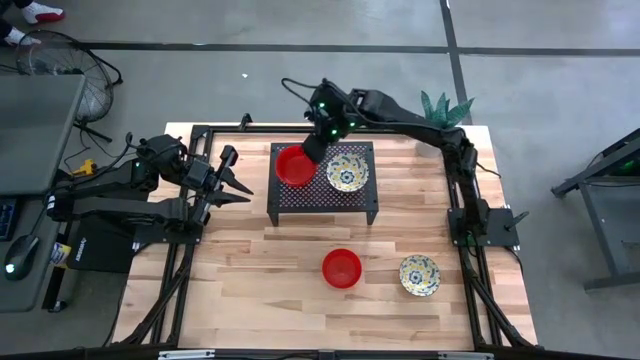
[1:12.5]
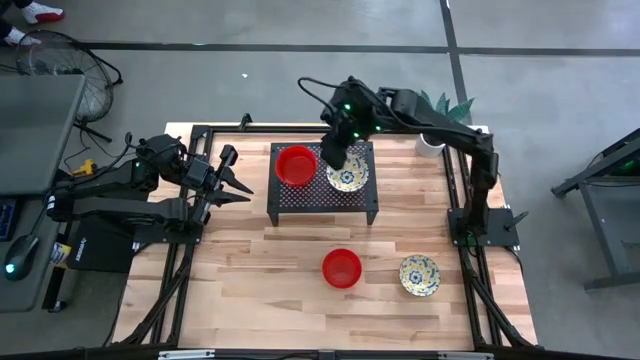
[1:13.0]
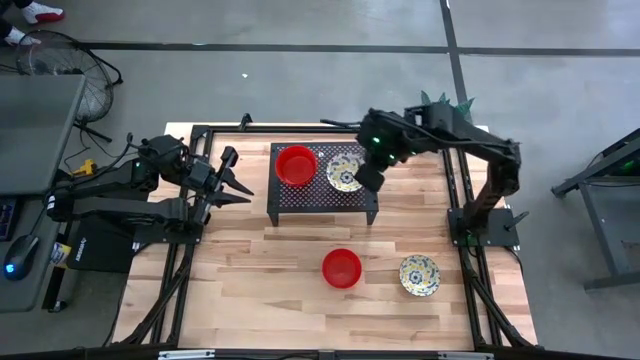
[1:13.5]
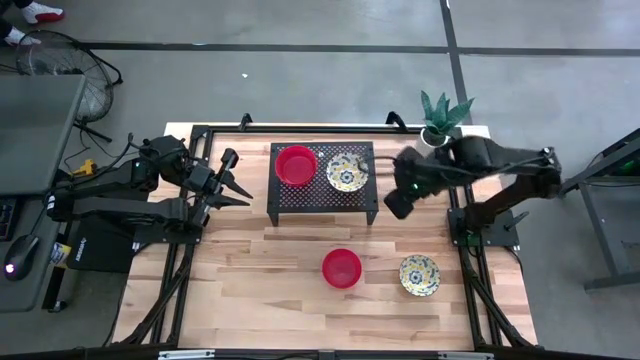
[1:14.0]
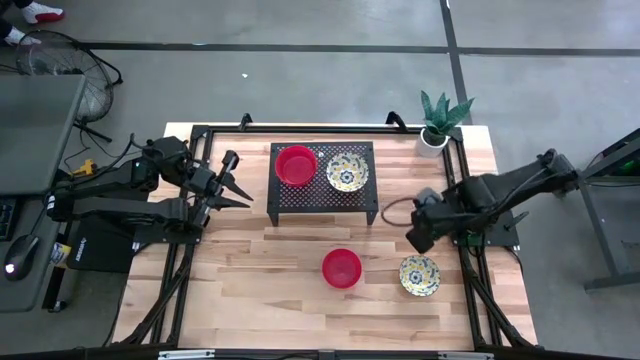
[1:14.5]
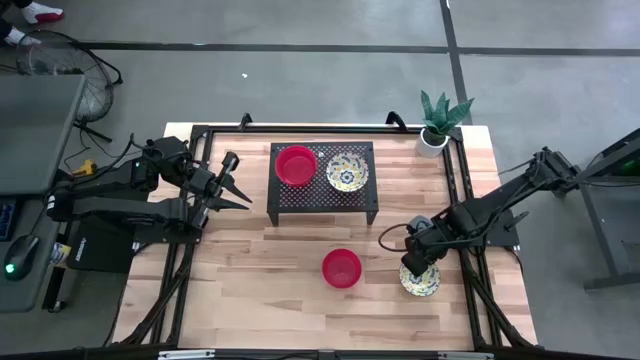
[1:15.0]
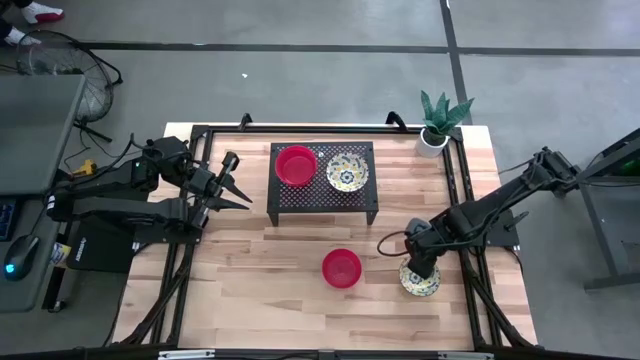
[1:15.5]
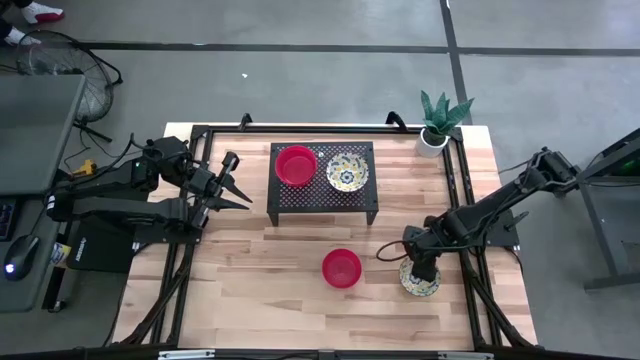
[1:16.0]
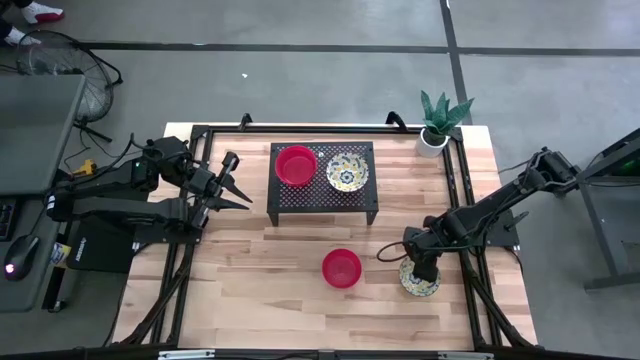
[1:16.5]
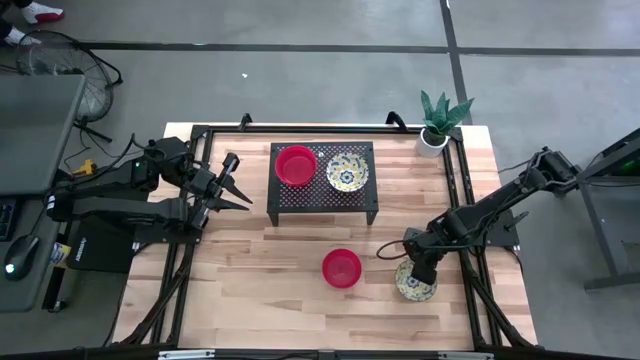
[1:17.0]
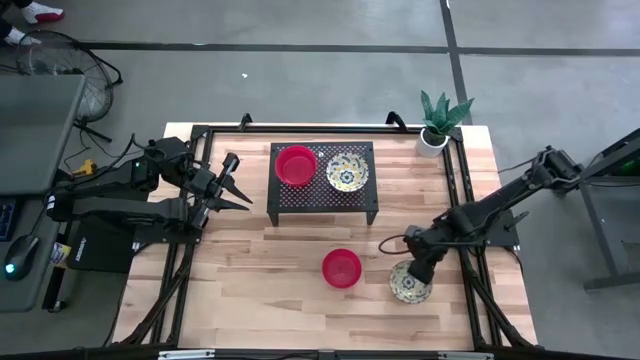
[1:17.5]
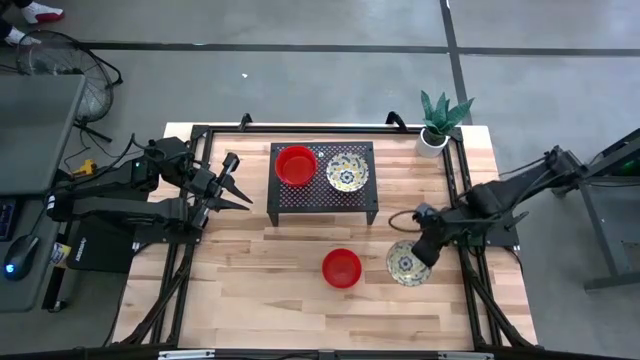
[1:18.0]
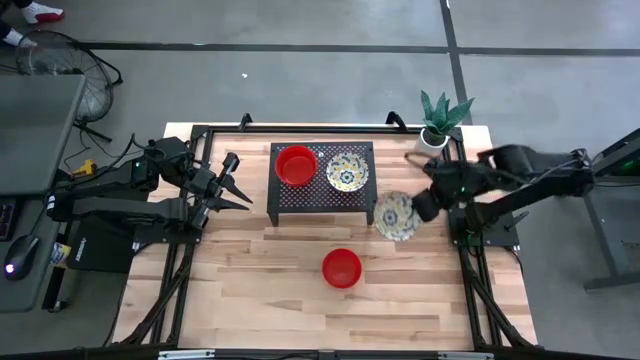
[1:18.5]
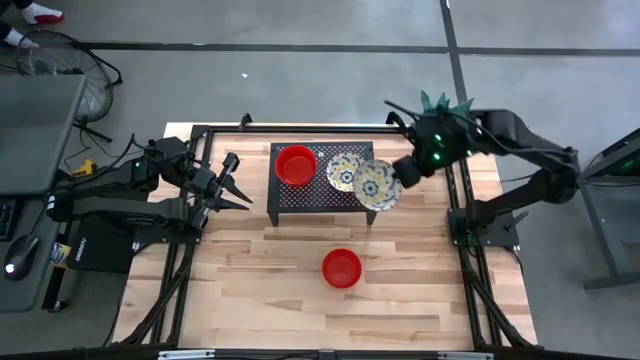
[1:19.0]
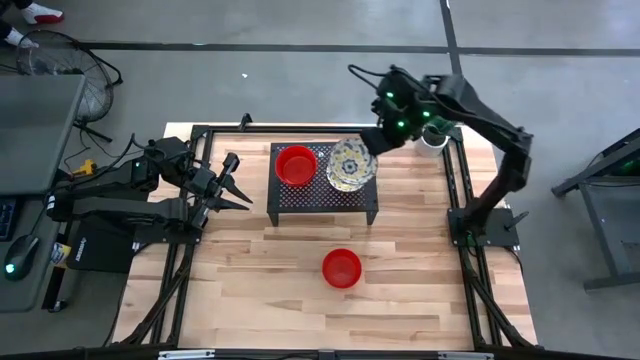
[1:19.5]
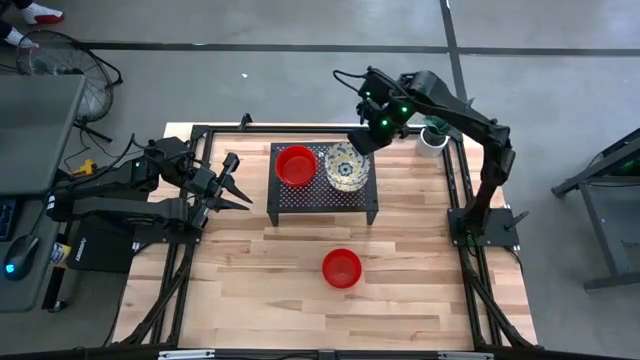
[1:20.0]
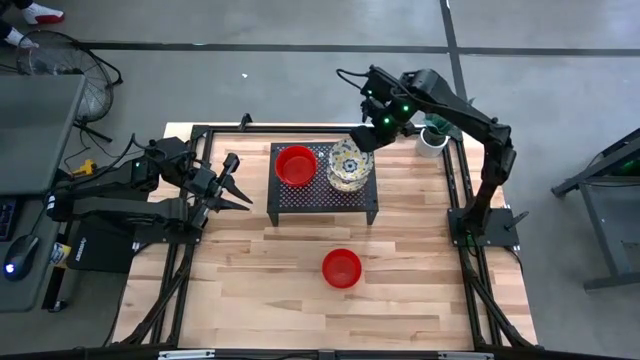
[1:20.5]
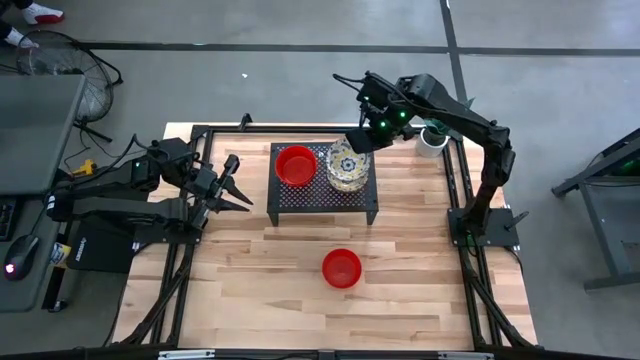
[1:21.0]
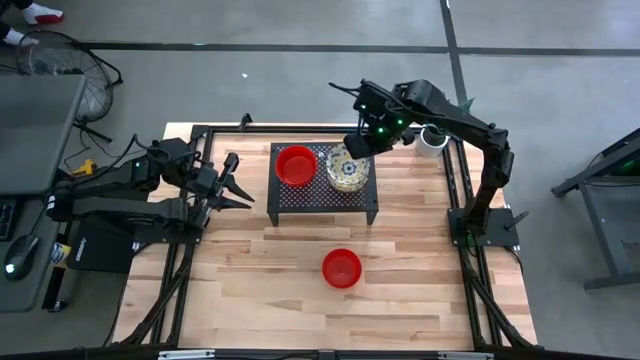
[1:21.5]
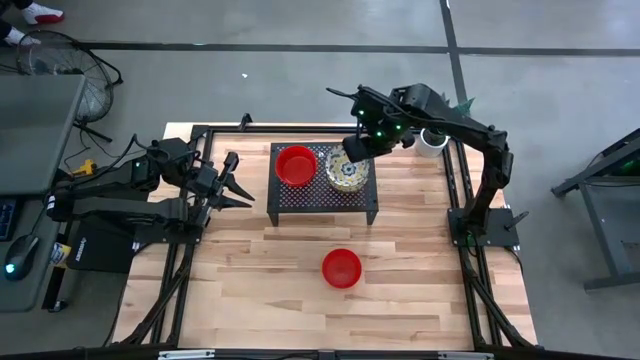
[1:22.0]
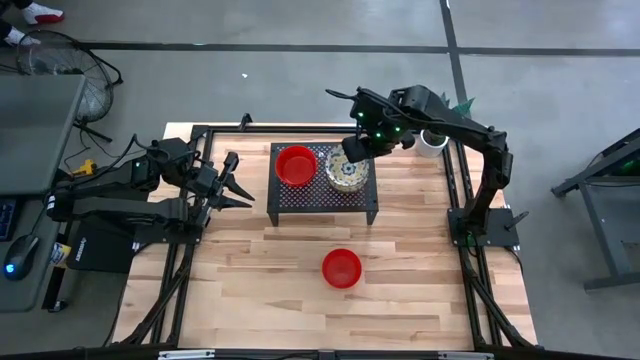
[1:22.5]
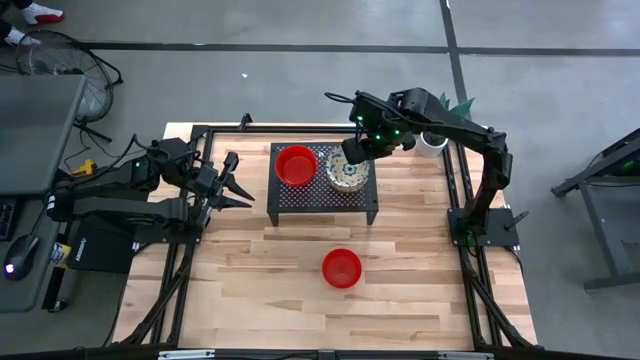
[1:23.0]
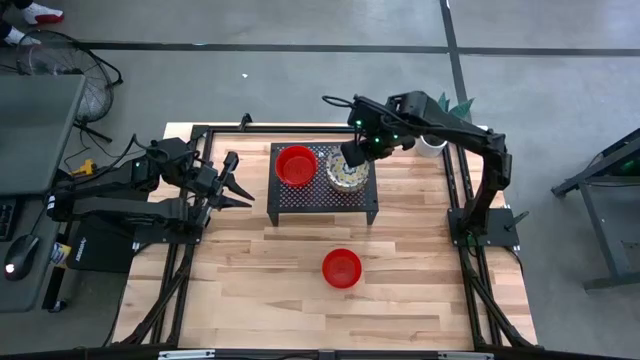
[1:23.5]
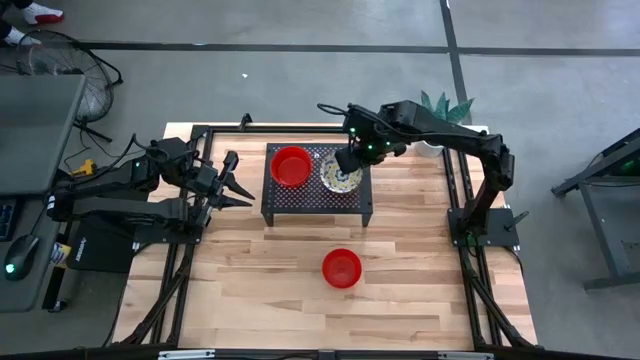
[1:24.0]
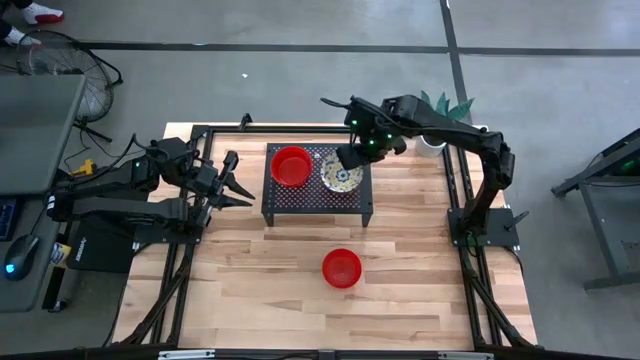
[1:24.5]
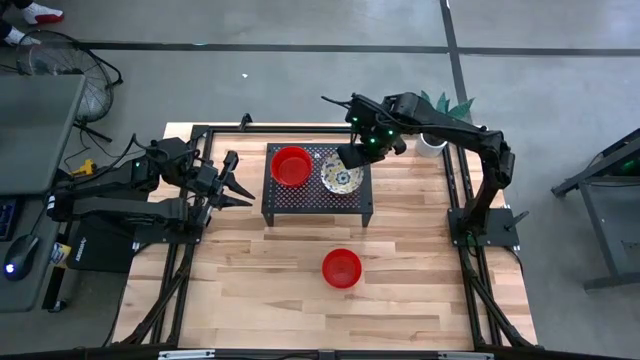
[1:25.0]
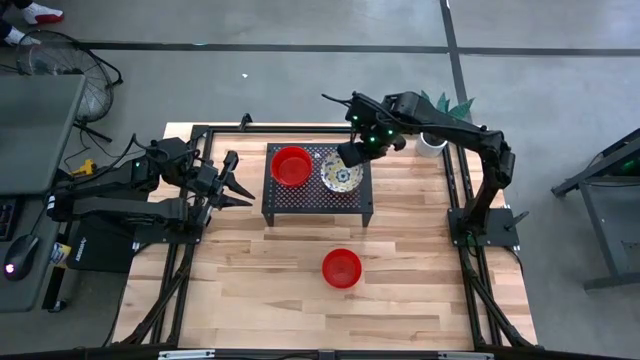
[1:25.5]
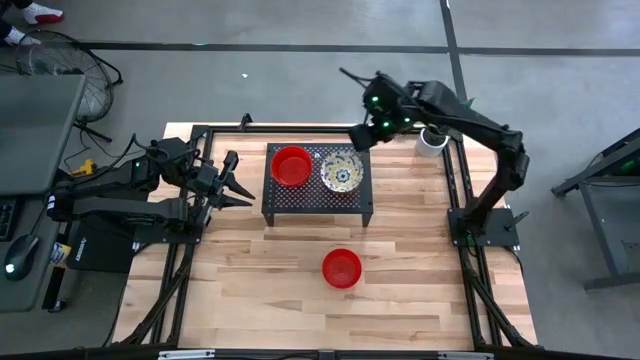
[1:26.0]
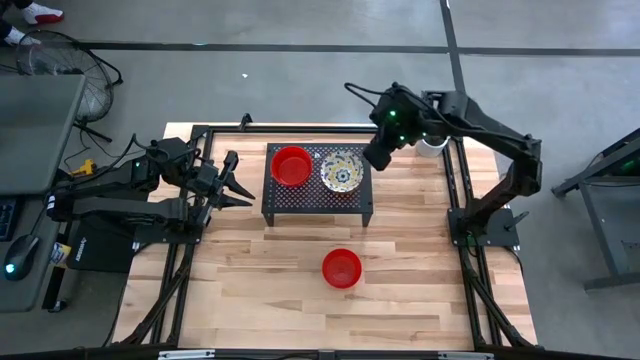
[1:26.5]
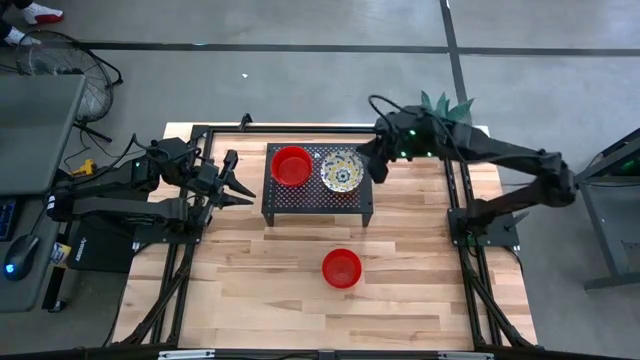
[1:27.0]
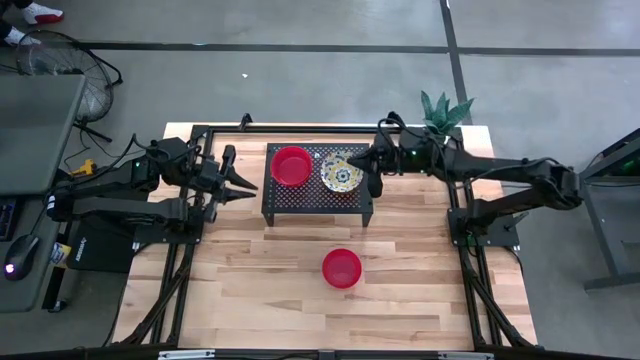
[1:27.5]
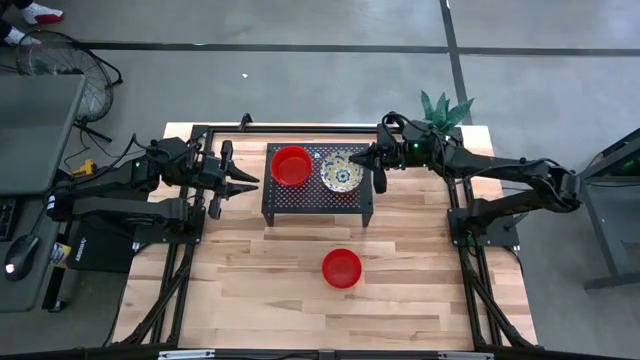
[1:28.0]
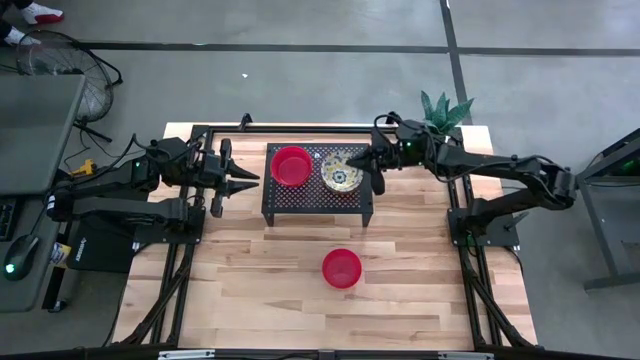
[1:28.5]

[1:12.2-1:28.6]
Task: Pick & Place Mini bowls
Stack the yellow patterned bowl on top of the yellow patterned bowl on the shelf

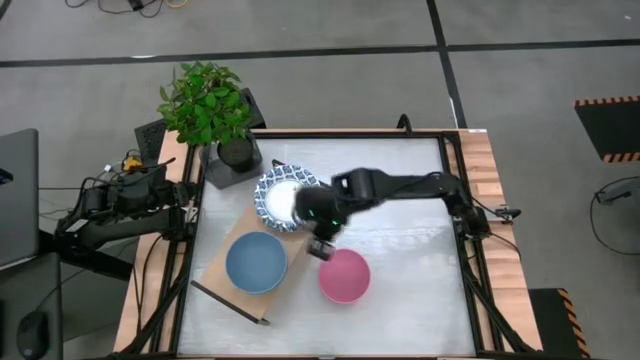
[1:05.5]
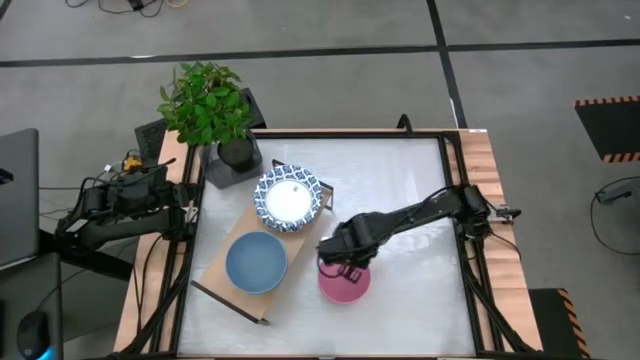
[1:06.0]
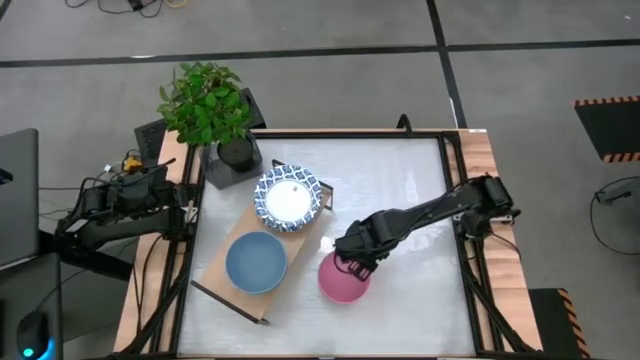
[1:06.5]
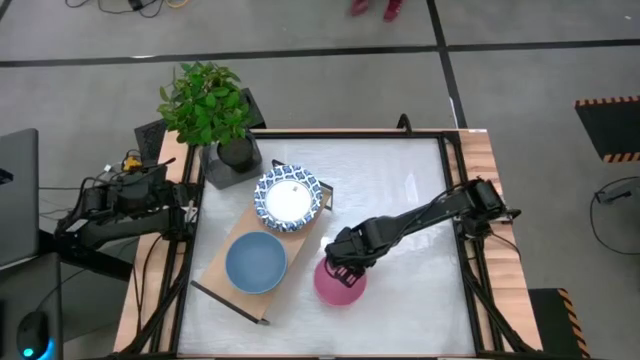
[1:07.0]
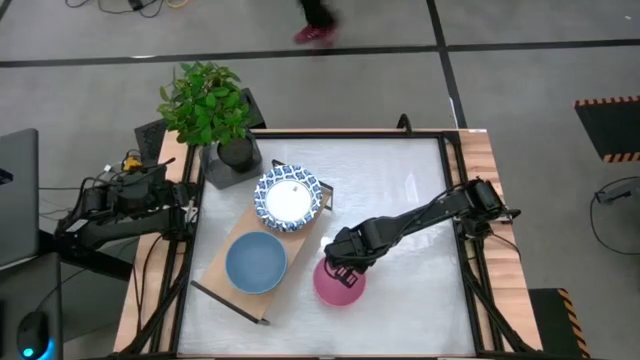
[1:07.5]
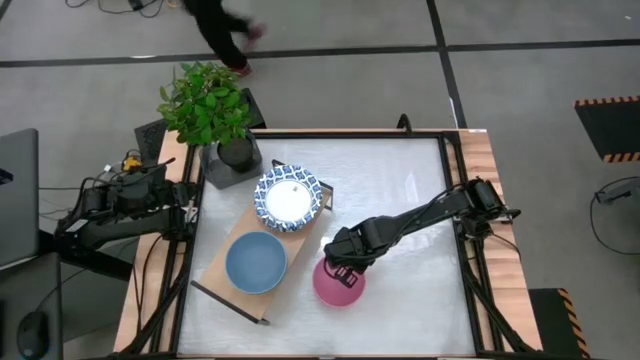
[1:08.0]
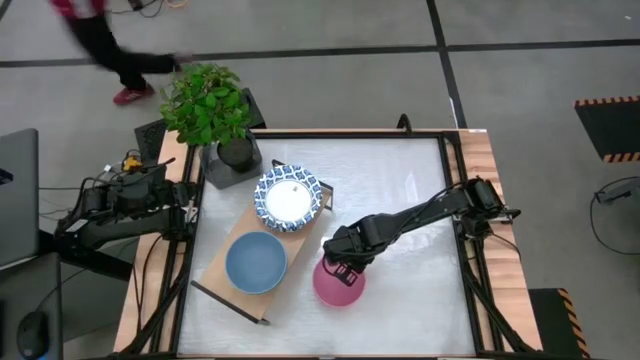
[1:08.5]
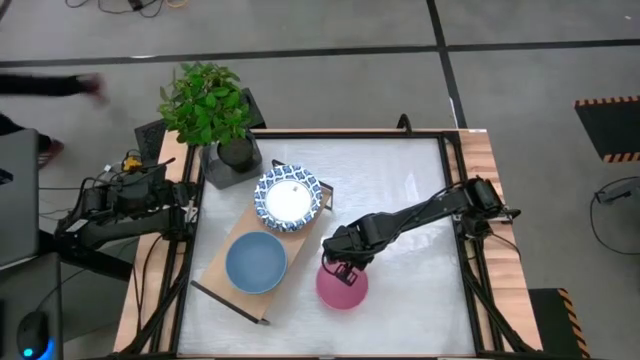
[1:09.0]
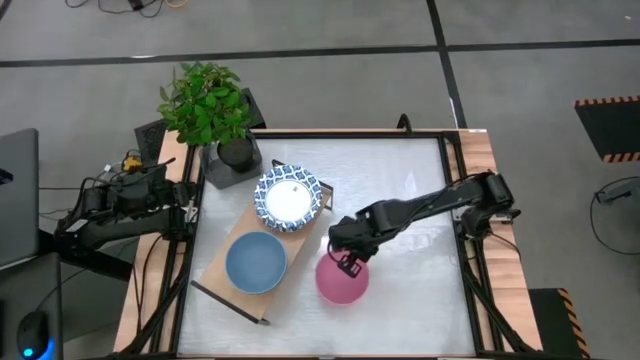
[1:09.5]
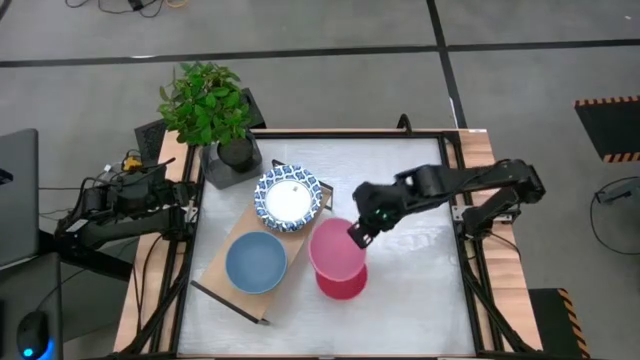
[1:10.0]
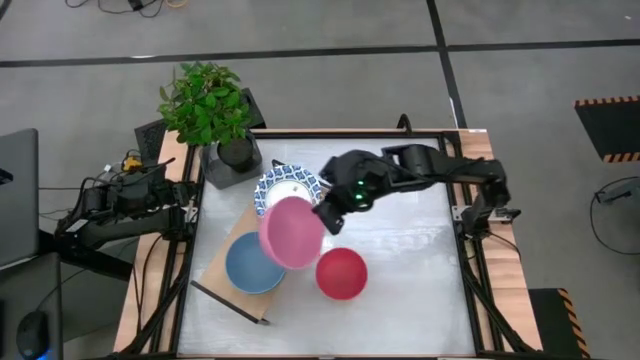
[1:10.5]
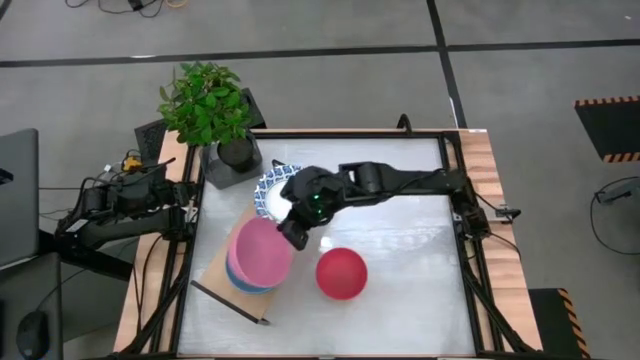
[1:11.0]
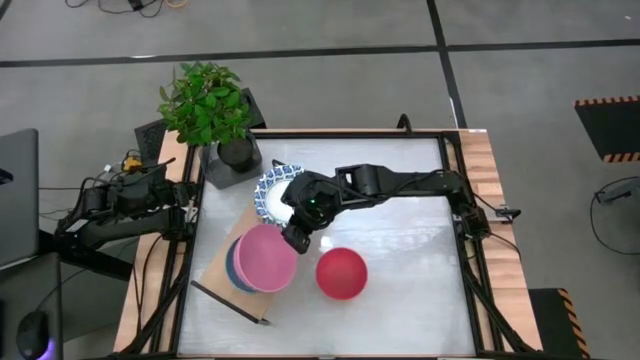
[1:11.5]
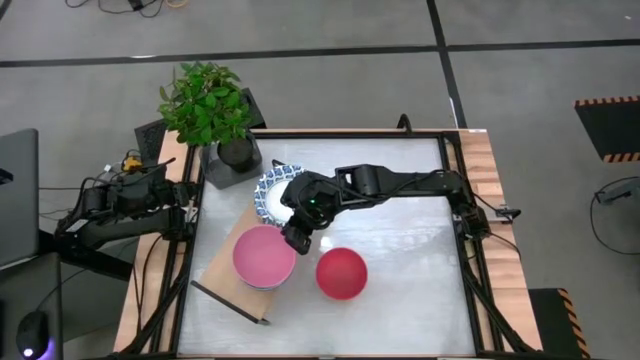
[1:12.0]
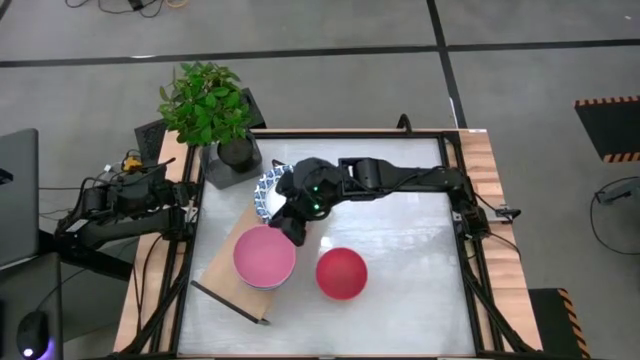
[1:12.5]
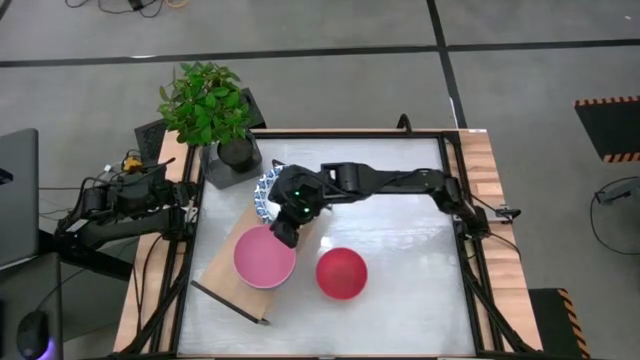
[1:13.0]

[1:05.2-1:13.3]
Task: Place and stack bowls onto a shelf
Stack the pink bowl on the blue bowl on the shelf
